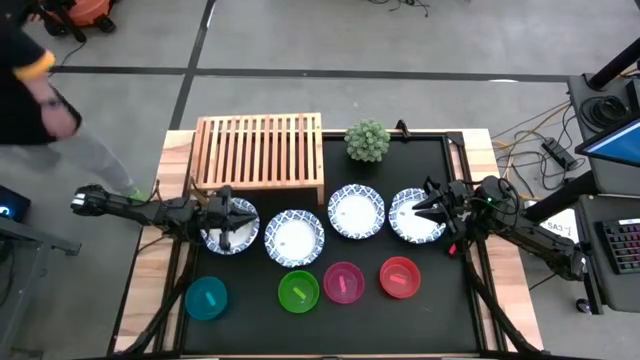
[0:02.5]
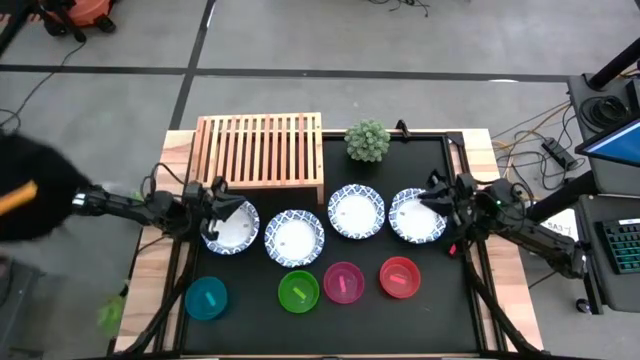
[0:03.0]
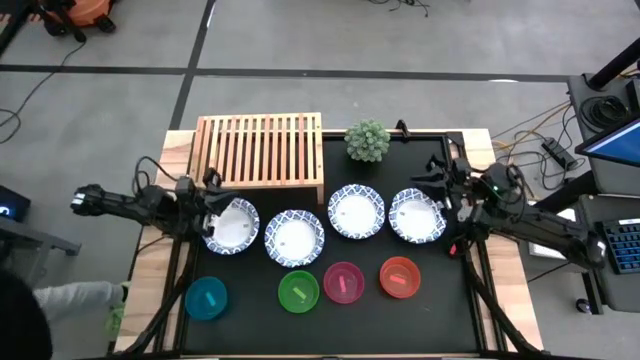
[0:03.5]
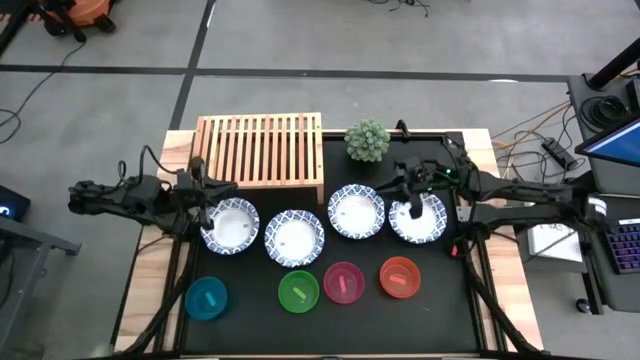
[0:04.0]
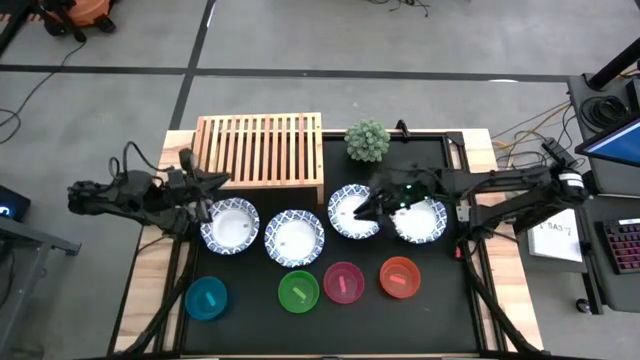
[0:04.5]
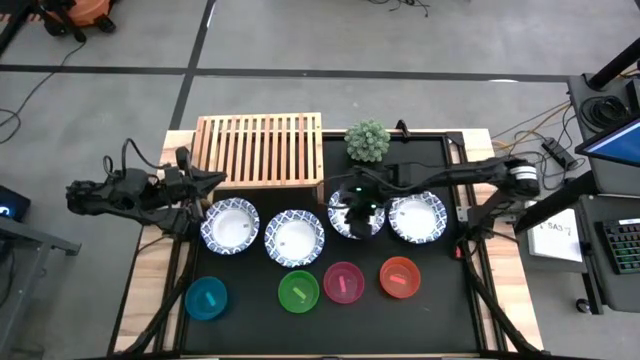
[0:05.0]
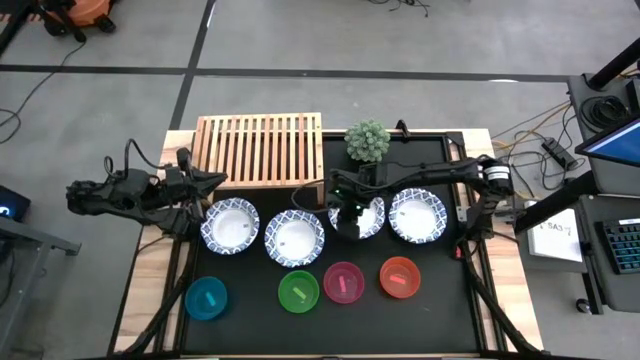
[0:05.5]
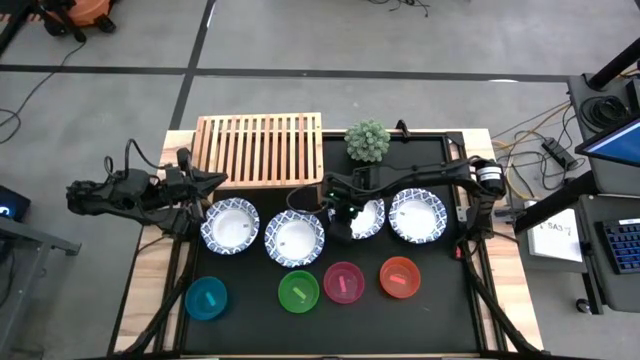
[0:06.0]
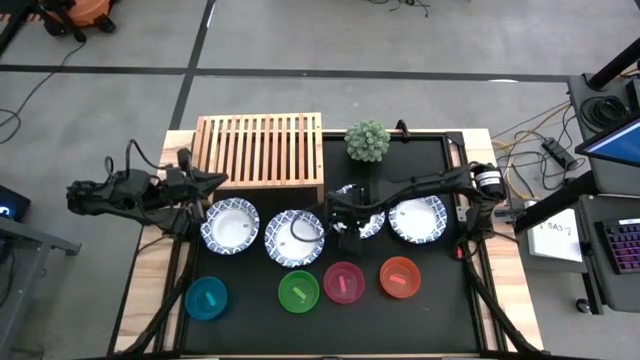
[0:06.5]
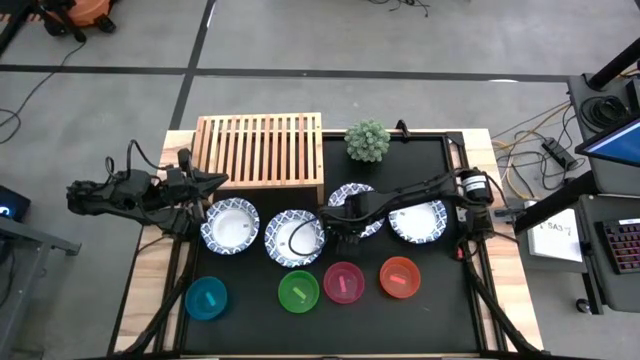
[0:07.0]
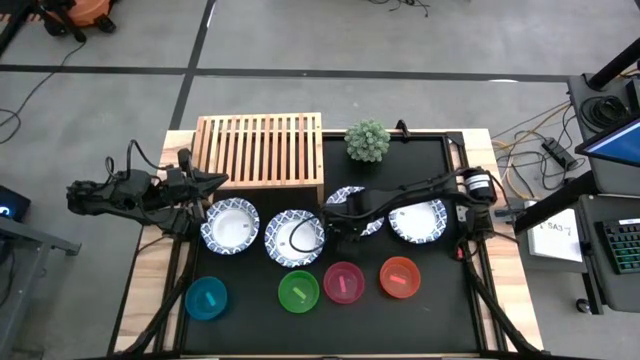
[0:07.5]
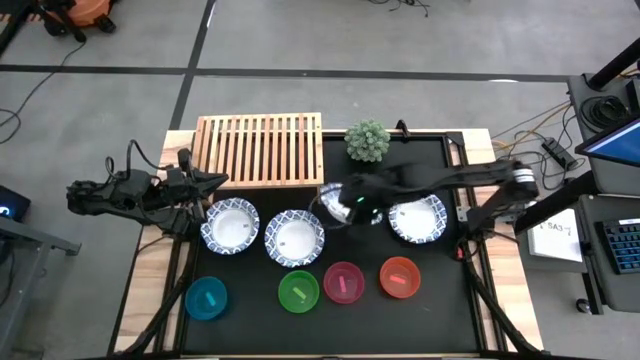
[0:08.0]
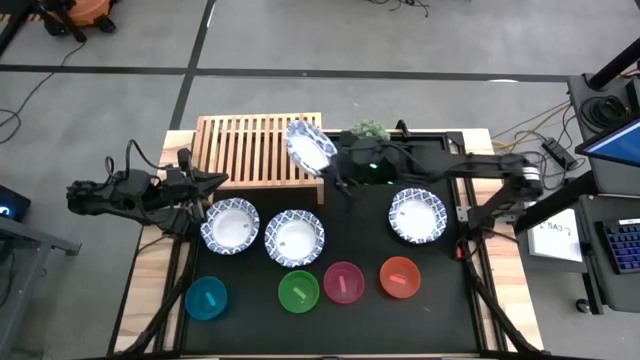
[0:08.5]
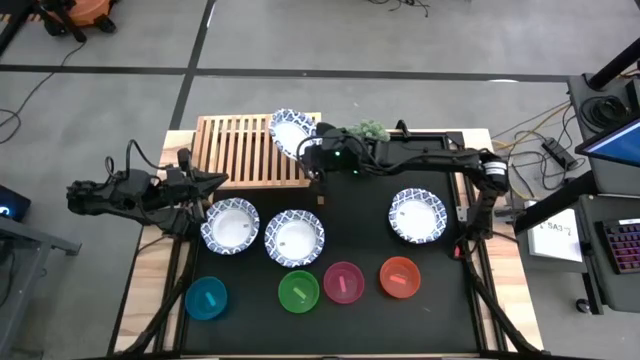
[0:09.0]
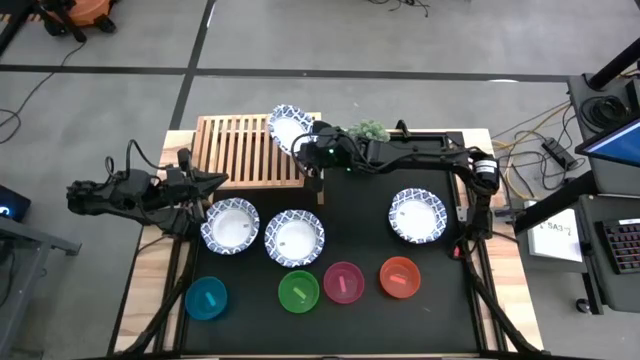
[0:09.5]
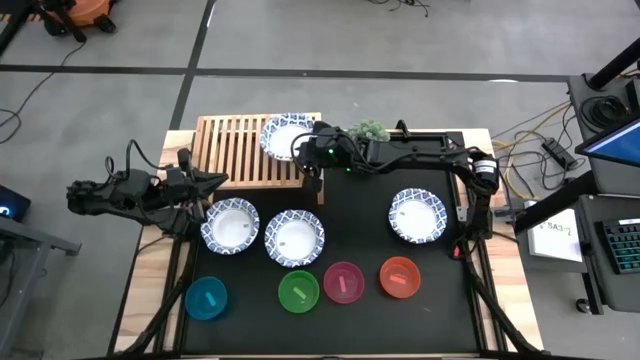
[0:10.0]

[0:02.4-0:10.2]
Task: Place and stack bowls onto a shelf
Put the center right blue patterned bowl on the shelf

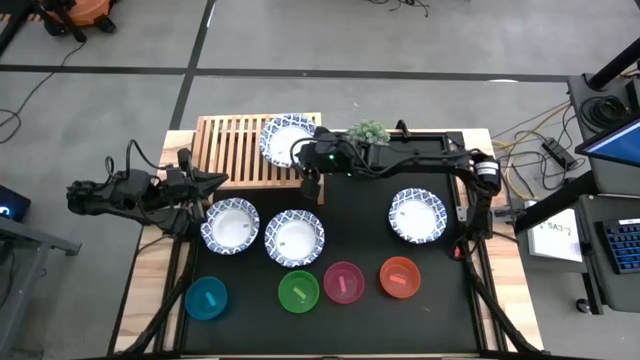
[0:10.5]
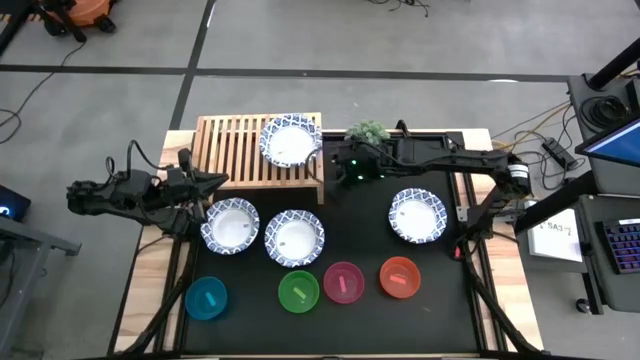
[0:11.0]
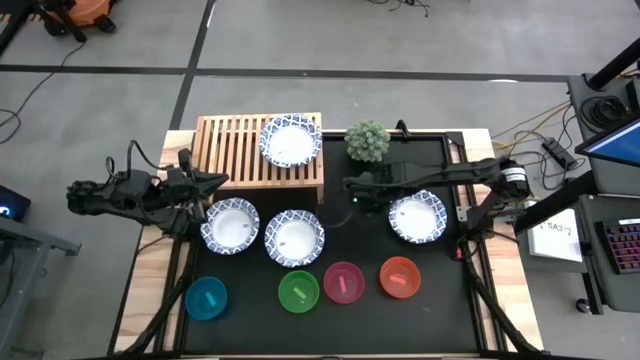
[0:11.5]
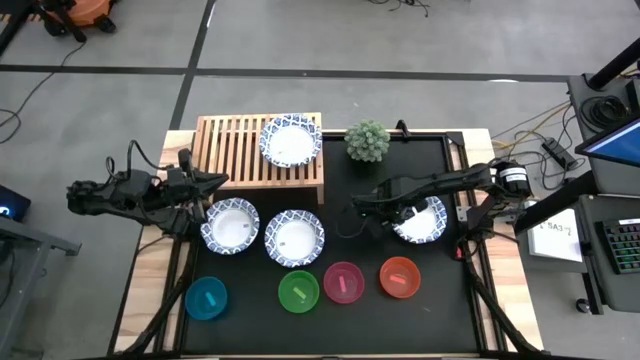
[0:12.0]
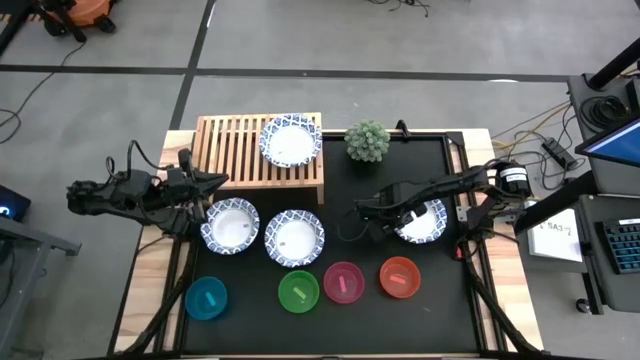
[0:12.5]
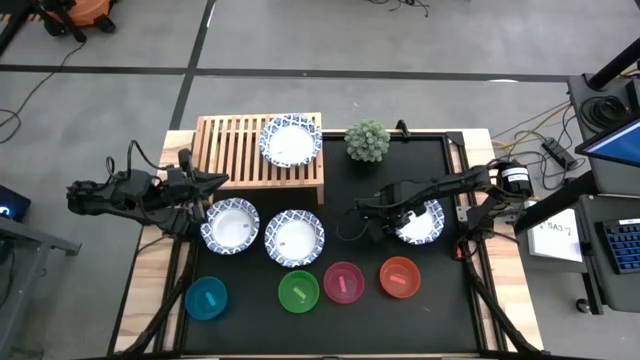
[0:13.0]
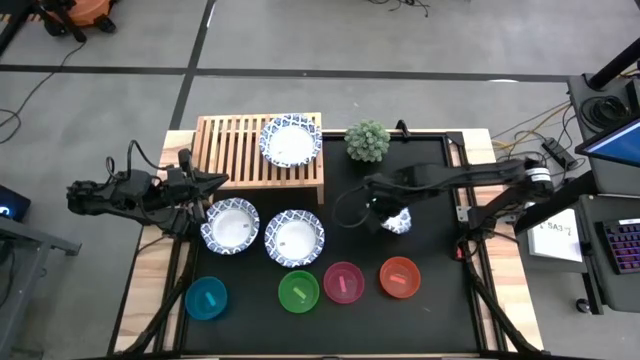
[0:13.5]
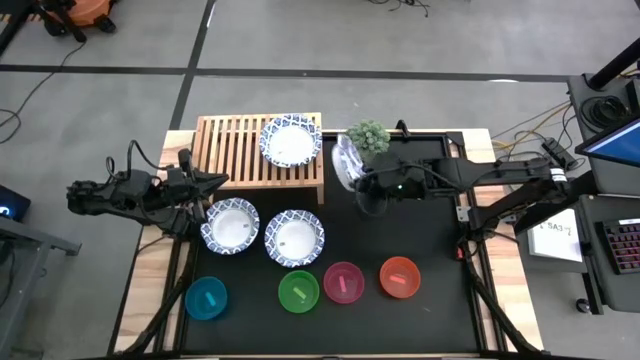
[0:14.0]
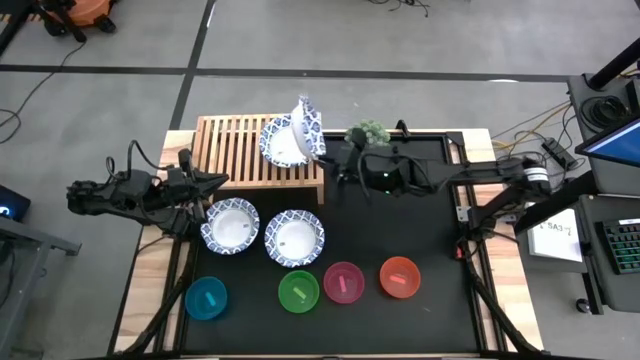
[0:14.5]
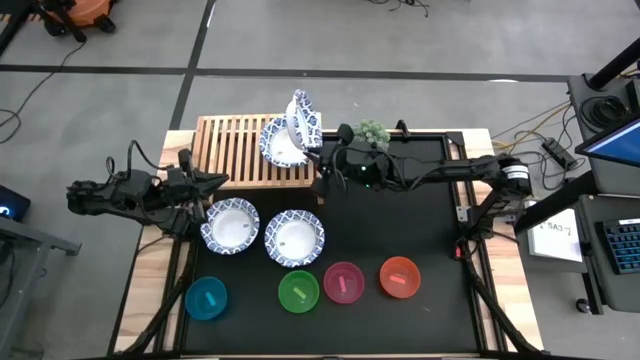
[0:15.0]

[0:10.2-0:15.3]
Stack the right blue patterned bowl on top of the blue patterned bowl on the shelf

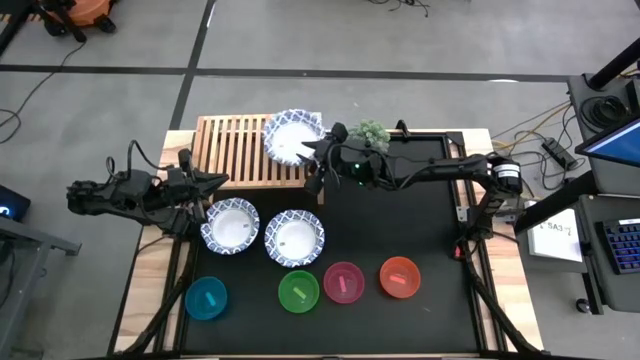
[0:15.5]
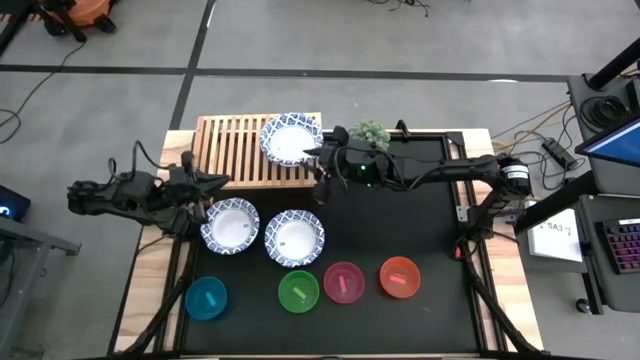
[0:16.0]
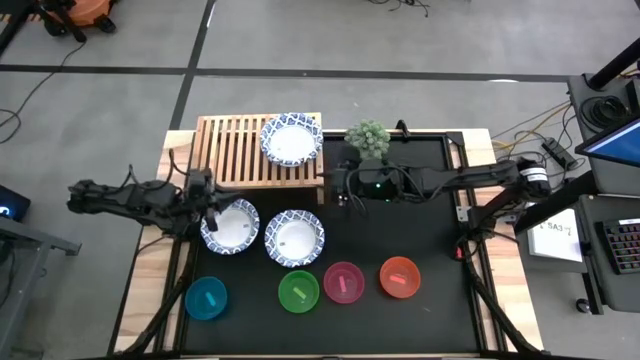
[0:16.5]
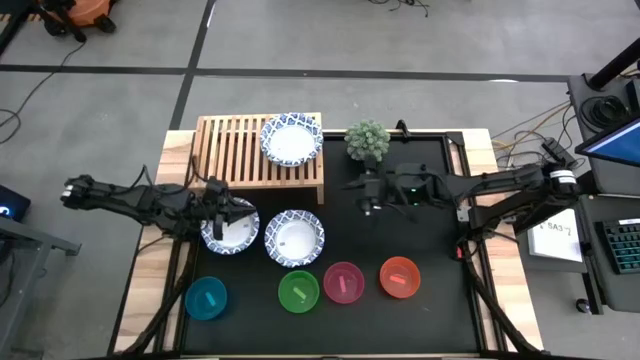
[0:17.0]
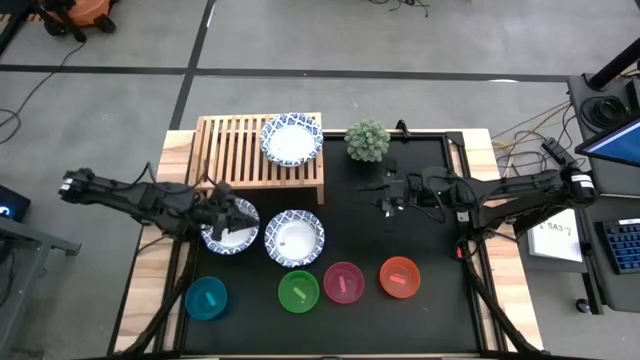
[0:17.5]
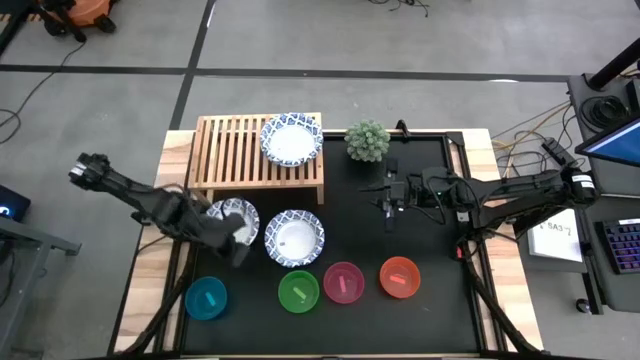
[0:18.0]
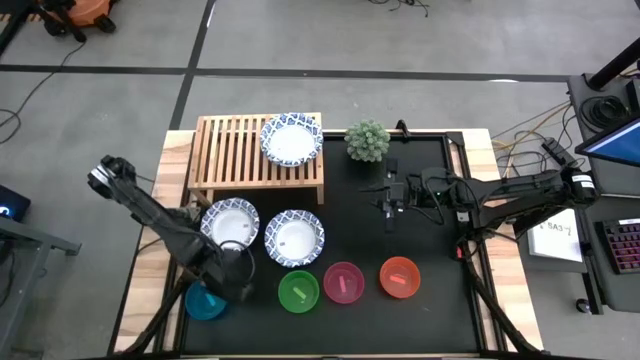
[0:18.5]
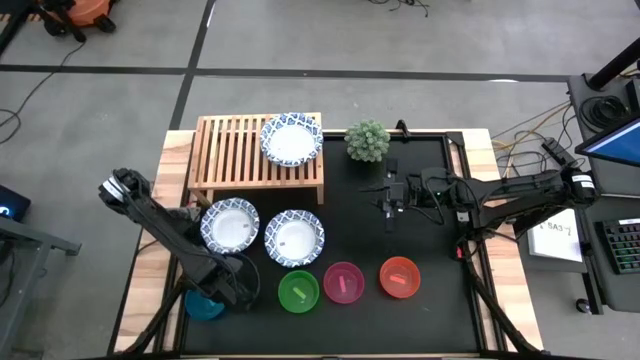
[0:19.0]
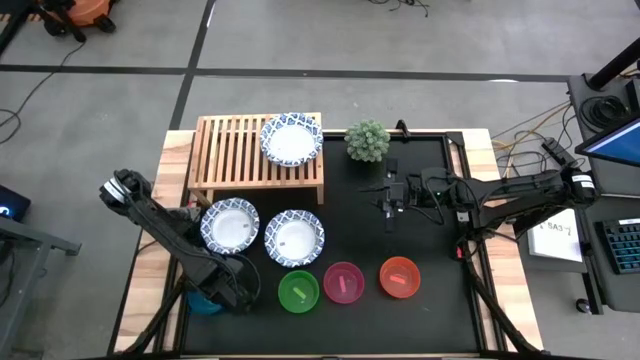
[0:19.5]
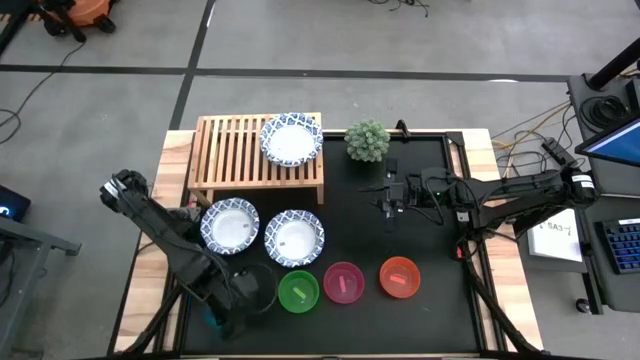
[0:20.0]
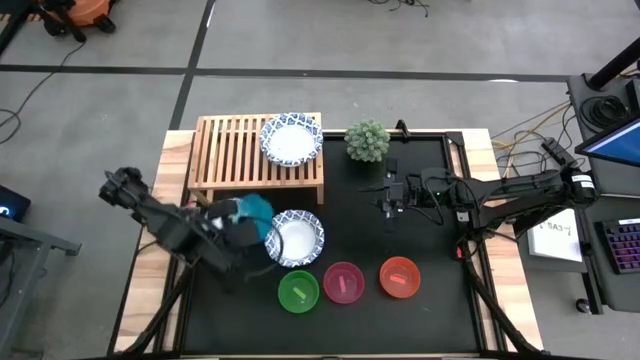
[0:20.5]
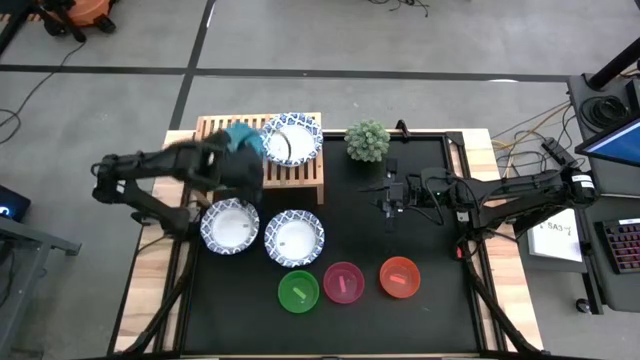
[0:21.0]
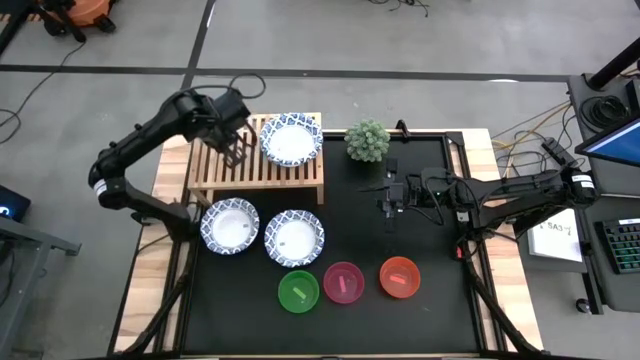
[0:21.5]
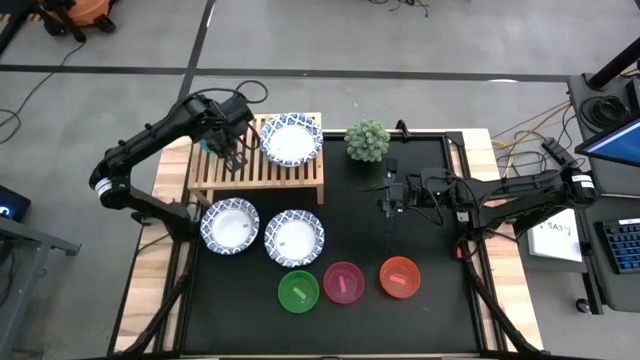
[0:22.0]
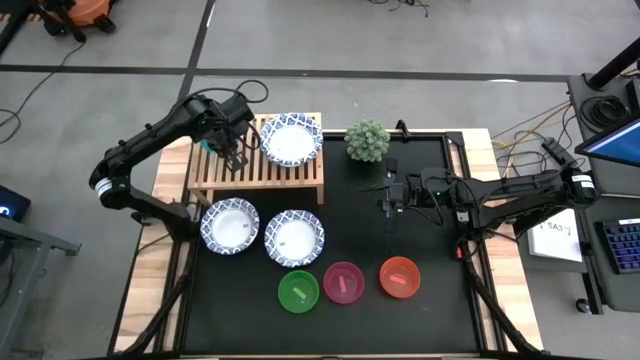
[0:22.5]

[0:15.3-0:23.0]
Put the blue bowl on the shelf

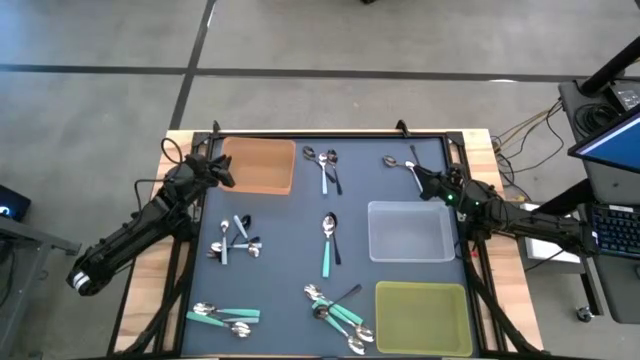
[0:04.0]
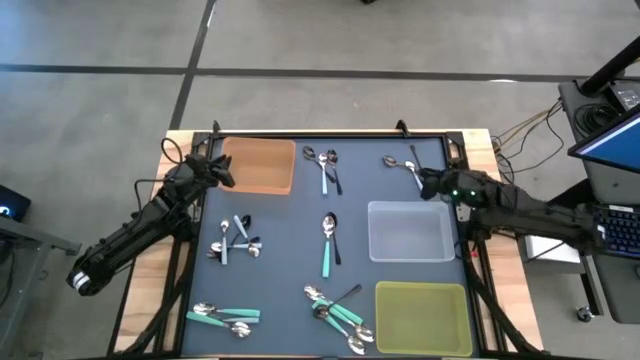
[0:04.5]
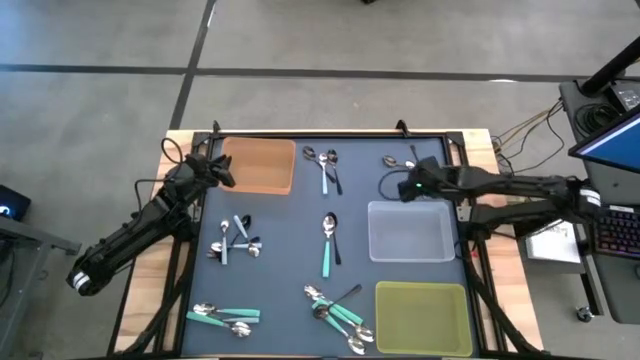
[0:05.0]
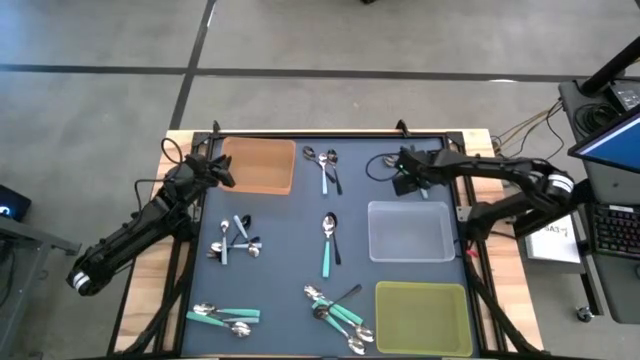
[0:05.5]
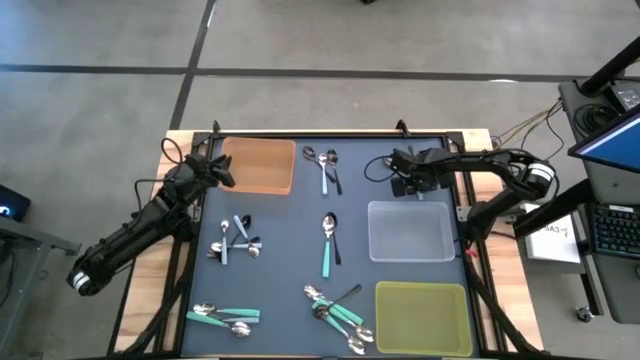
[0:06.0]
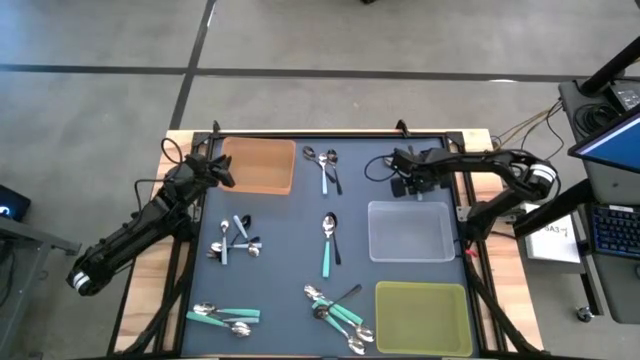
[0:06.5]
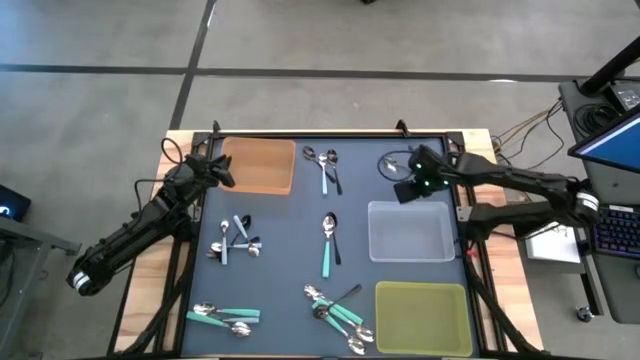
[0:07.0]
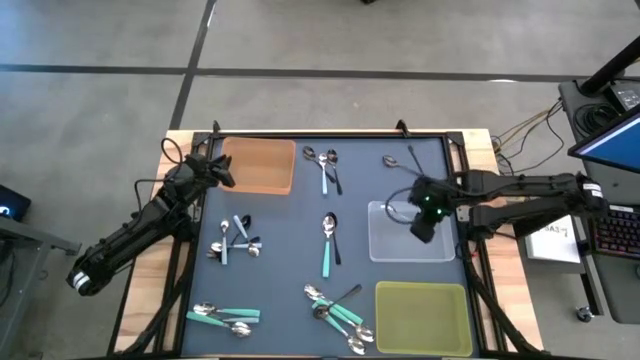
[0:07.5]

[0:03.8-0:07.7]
Task: Sort silverware by color (type)
Put the white spoon into the transparent bin
